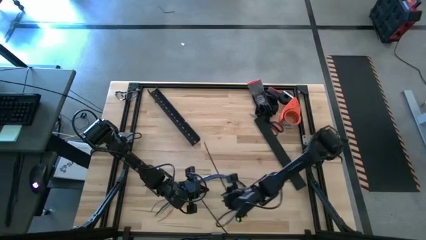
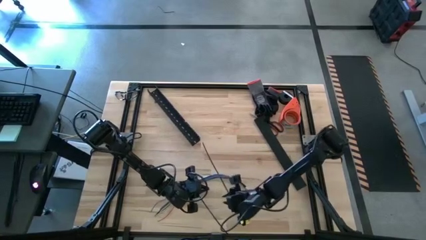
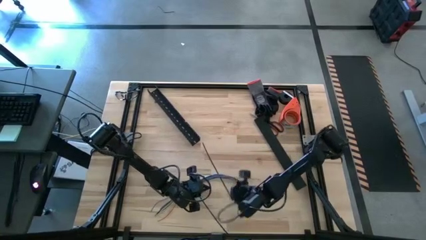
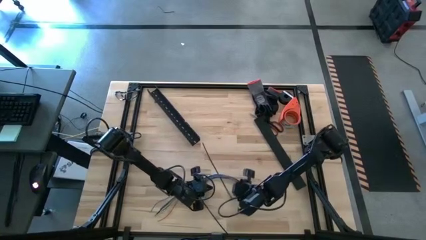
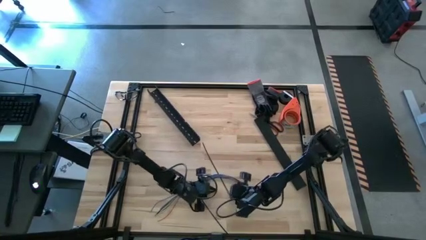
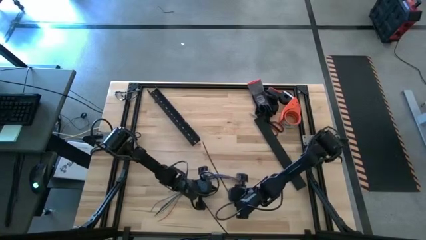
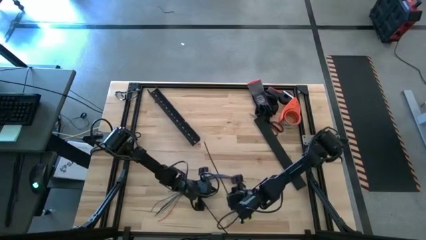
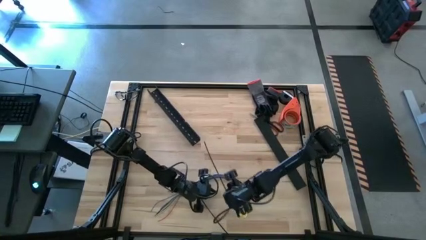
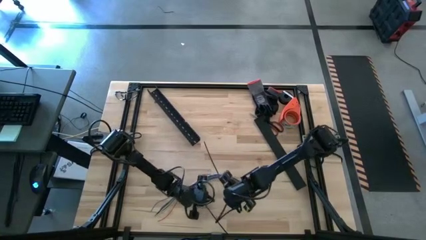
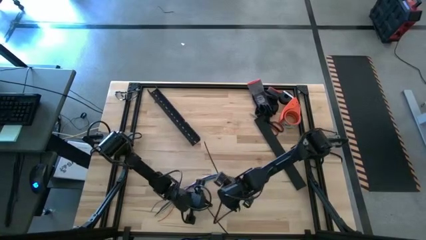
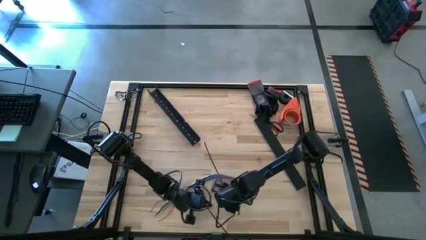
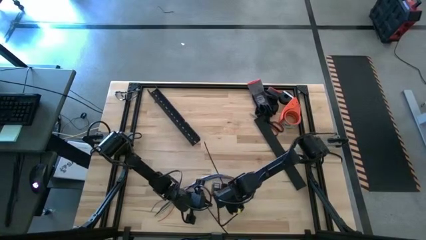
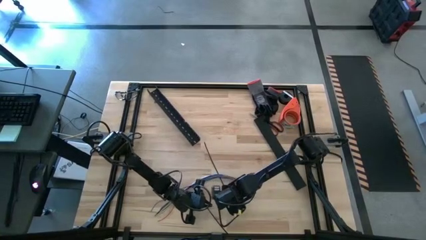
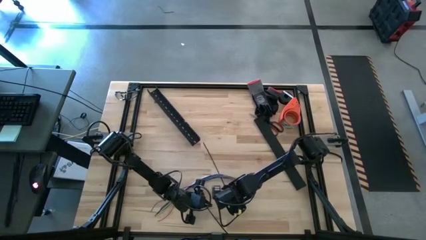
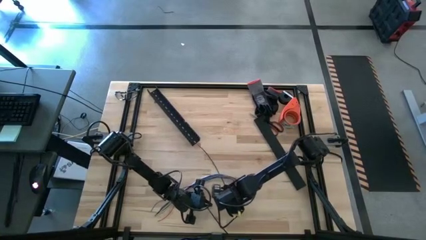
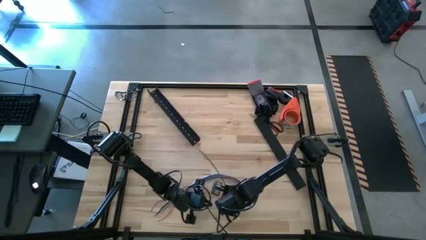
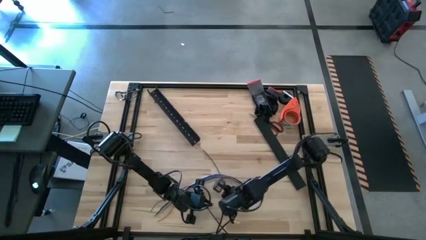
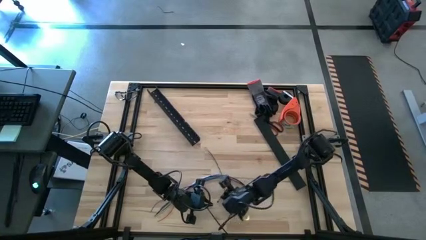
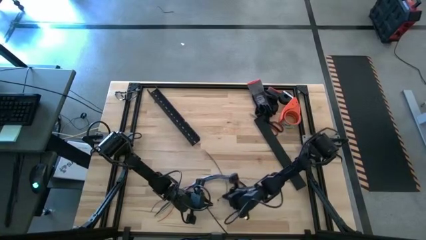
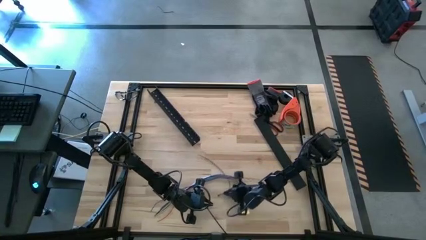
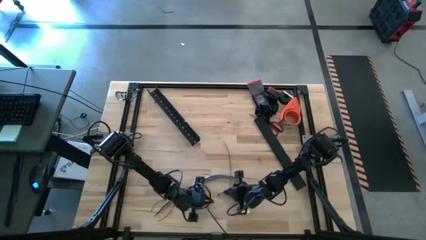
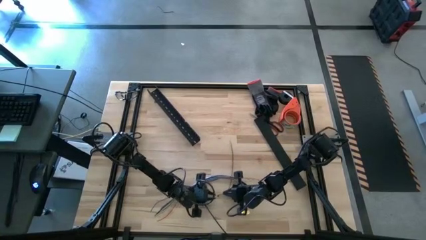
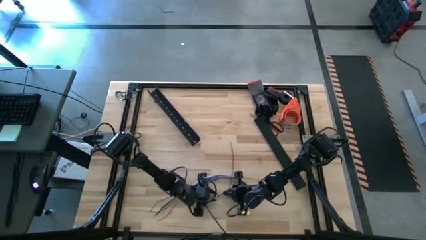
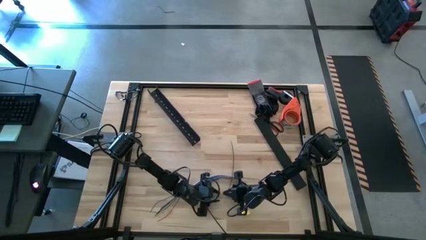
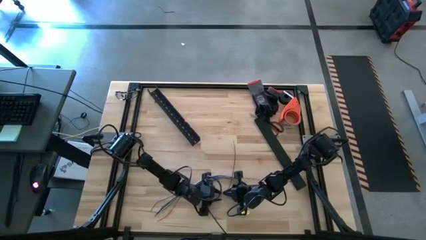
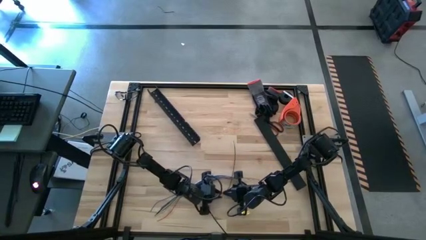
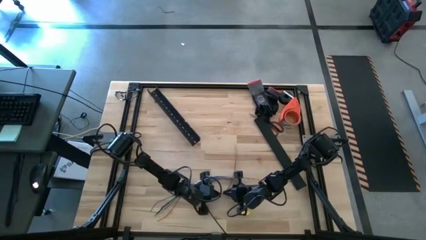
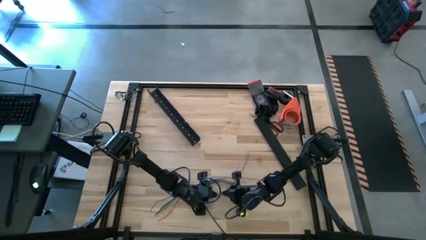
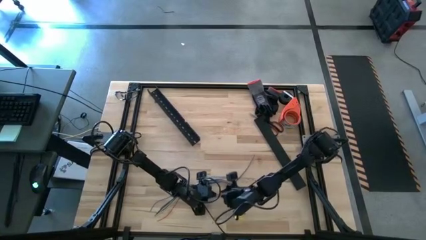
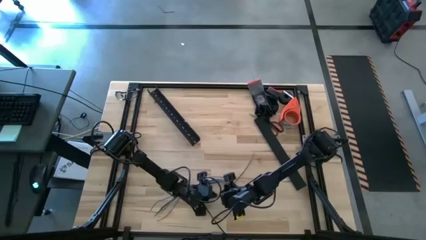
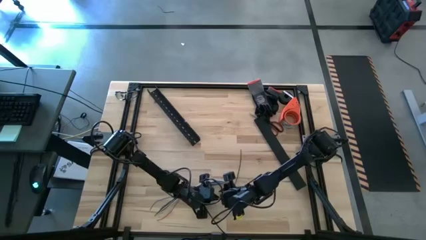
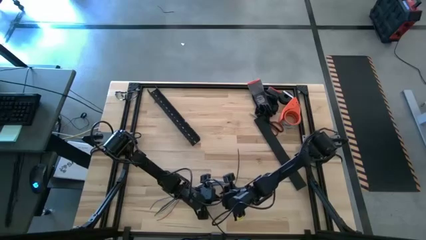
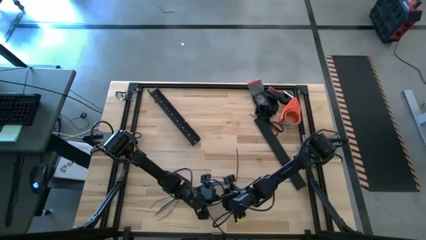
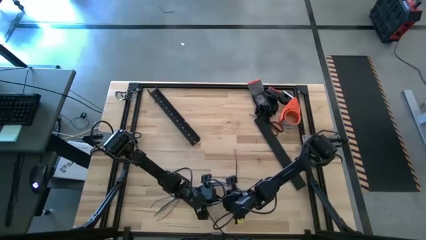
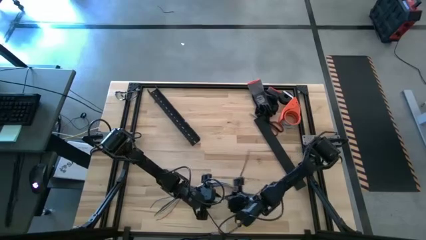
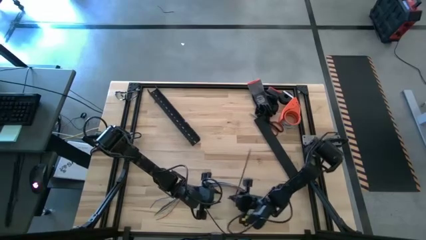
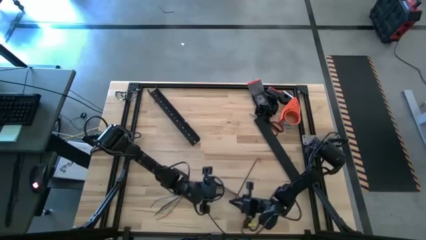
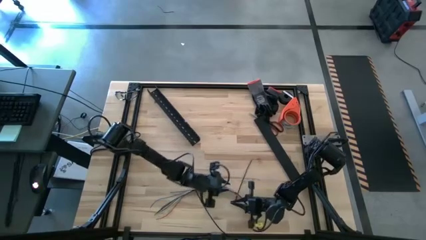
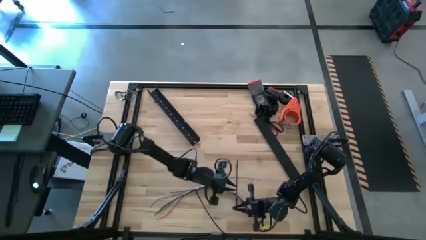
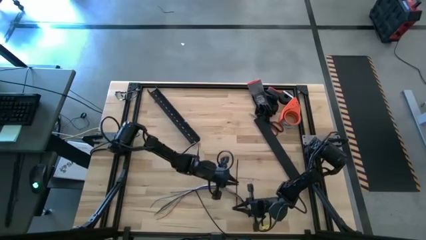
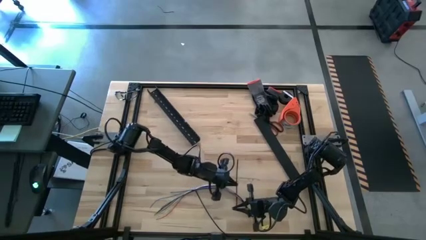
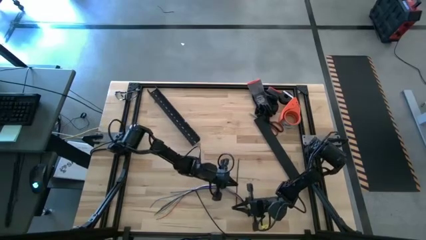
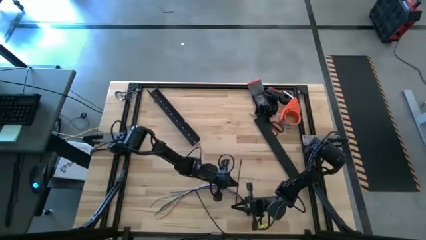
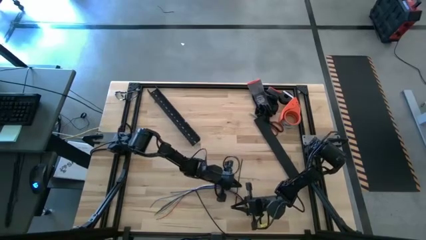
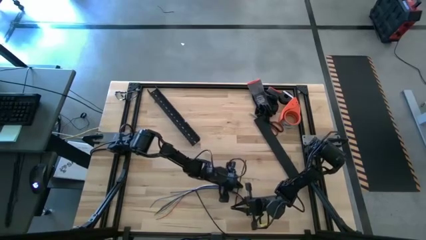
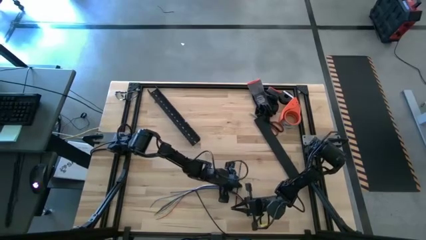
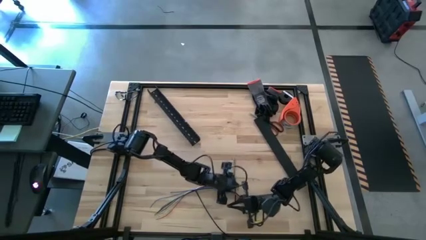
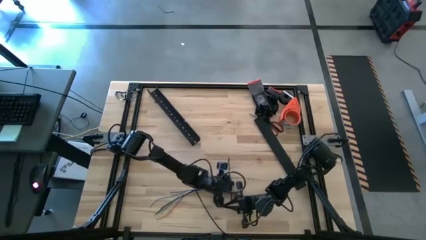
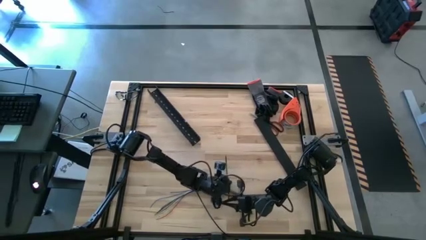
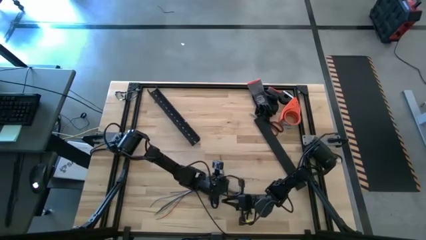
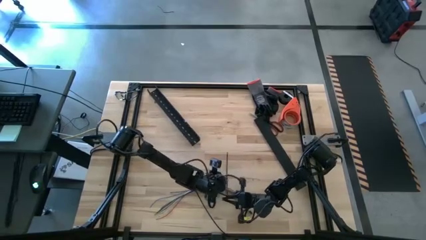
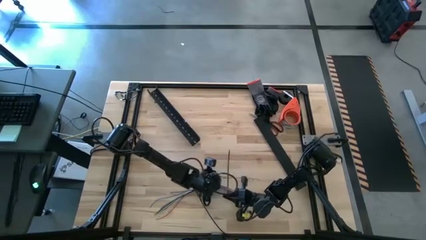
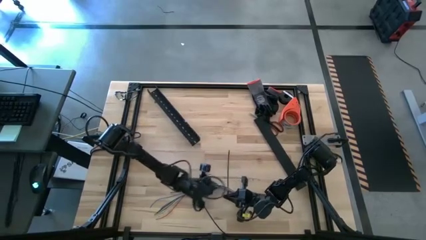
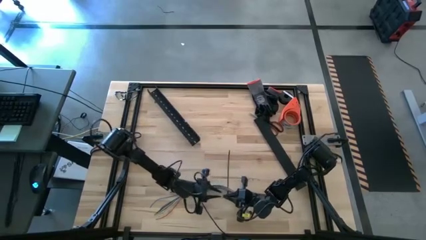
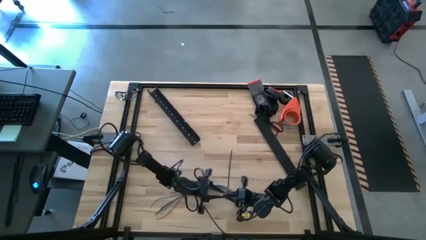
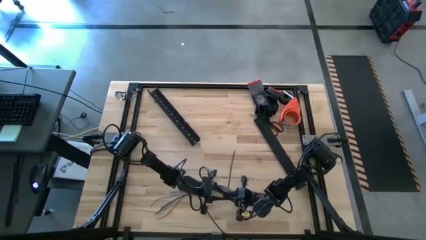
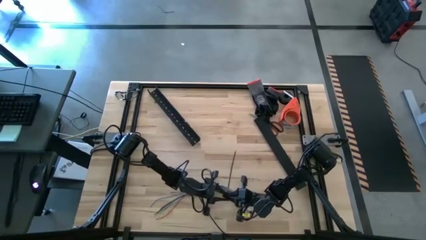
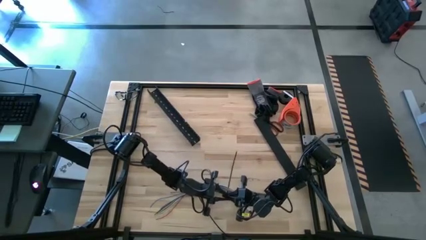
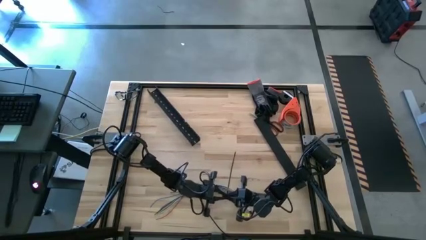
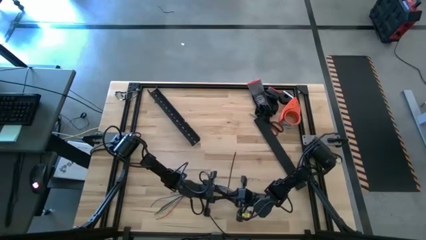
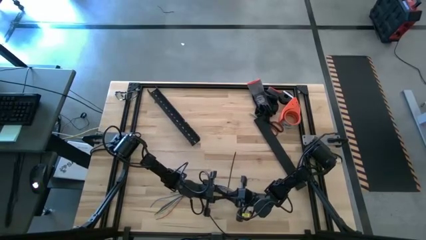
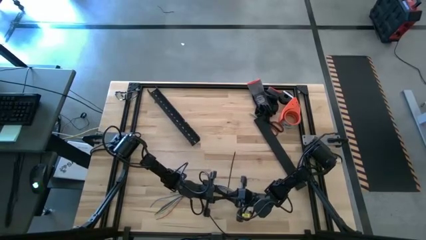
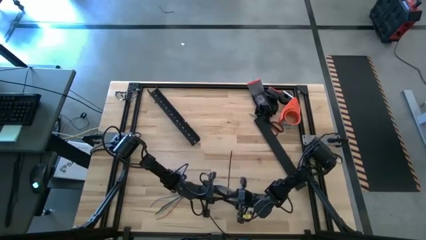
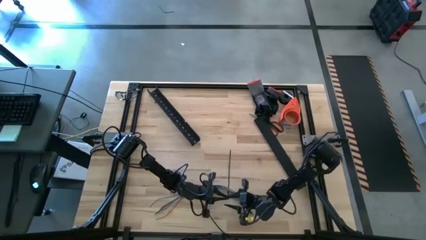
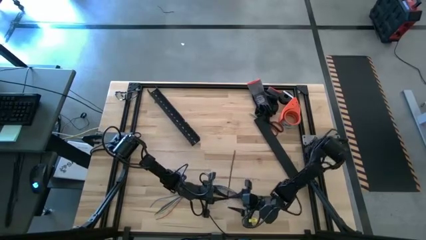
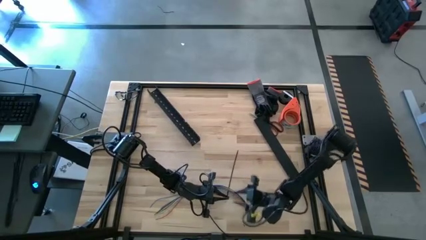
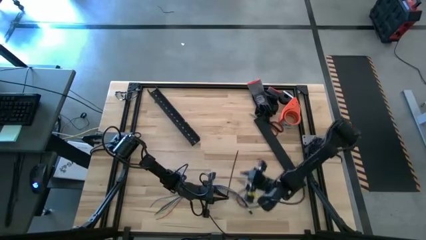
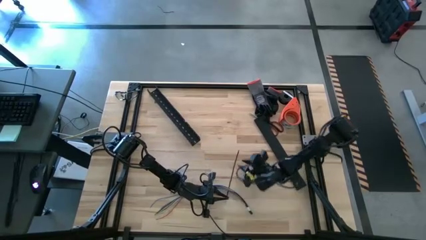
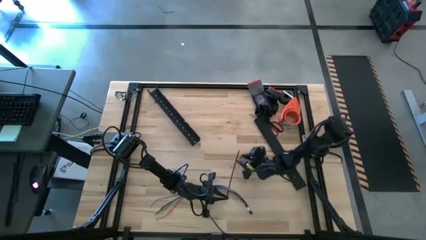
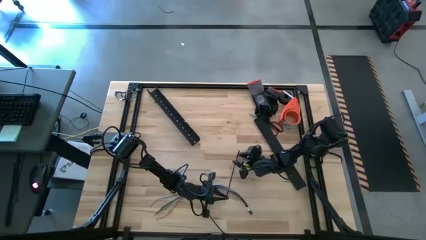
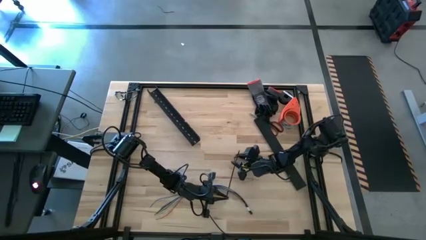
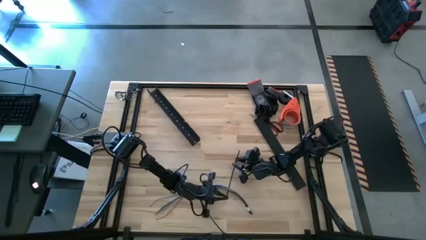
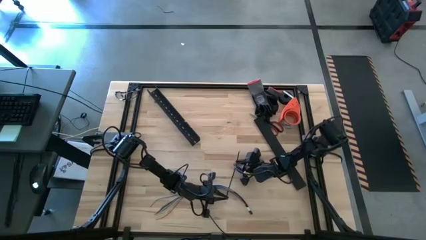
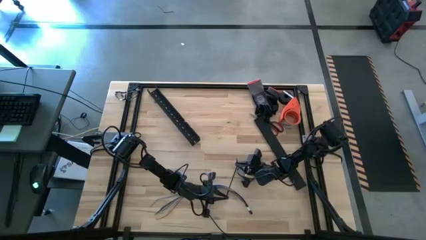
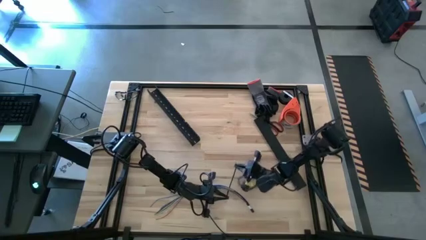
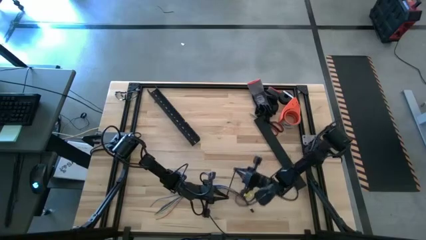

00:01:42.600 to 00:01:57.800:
Task: Ziptie cables
Wrap the cable wires with the black zip tie
